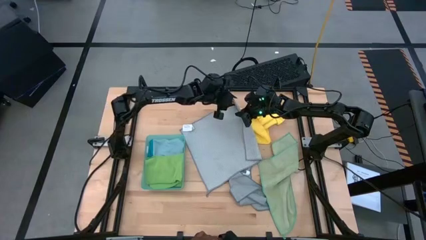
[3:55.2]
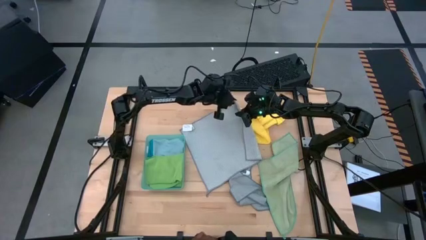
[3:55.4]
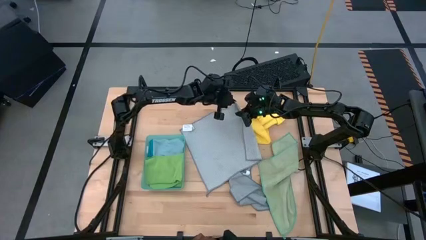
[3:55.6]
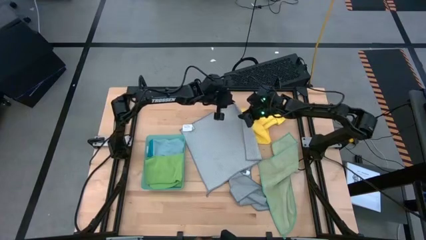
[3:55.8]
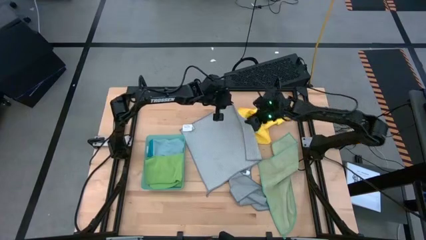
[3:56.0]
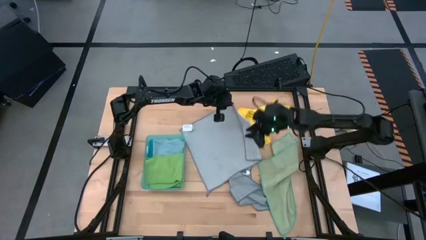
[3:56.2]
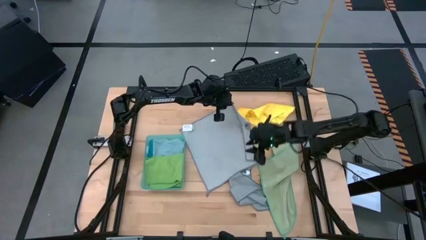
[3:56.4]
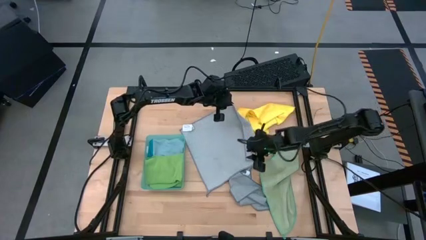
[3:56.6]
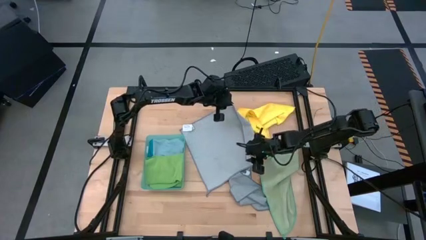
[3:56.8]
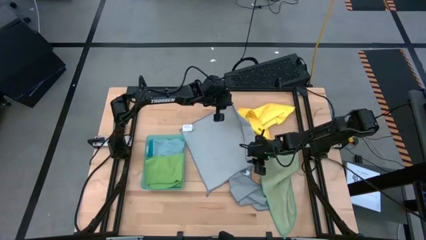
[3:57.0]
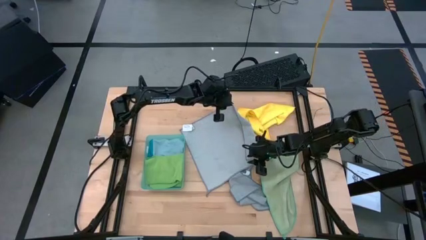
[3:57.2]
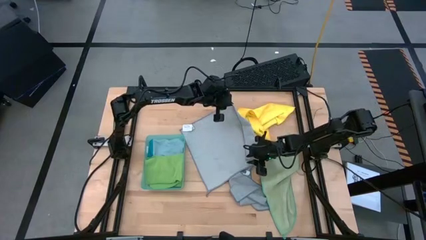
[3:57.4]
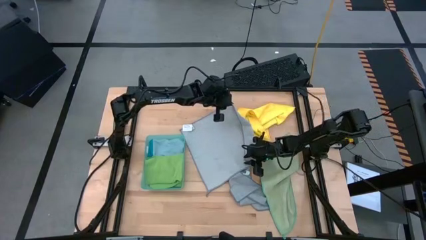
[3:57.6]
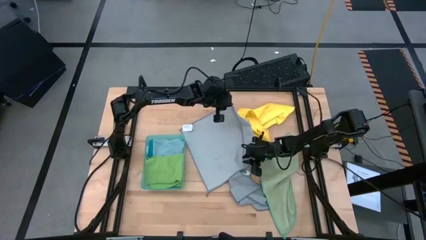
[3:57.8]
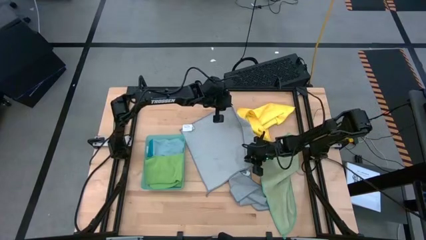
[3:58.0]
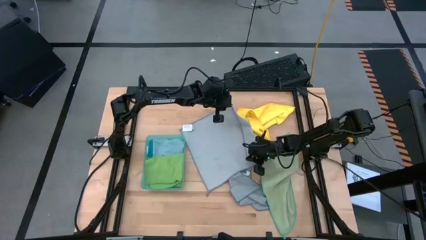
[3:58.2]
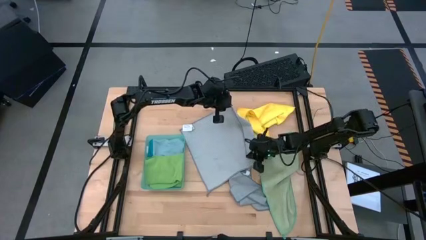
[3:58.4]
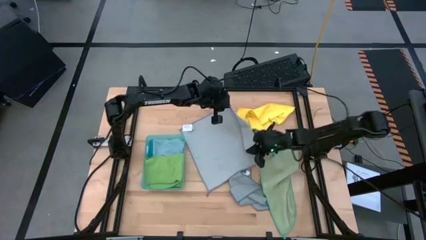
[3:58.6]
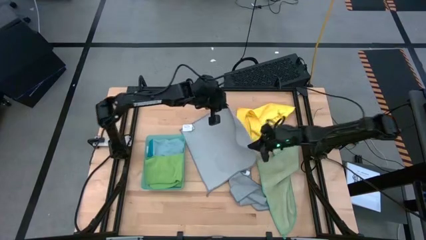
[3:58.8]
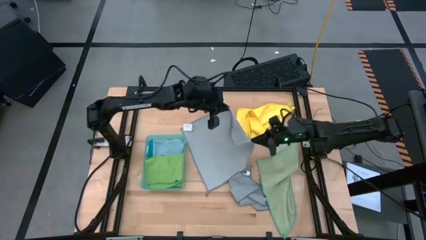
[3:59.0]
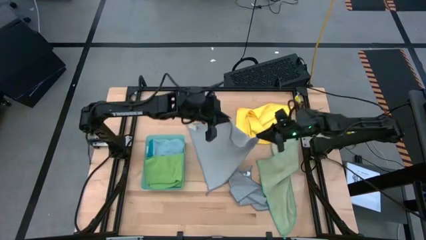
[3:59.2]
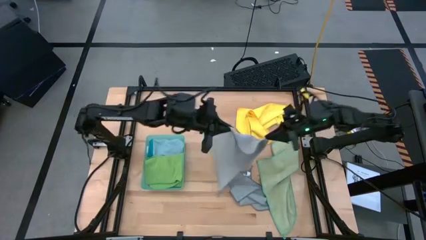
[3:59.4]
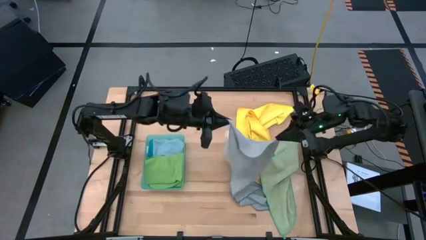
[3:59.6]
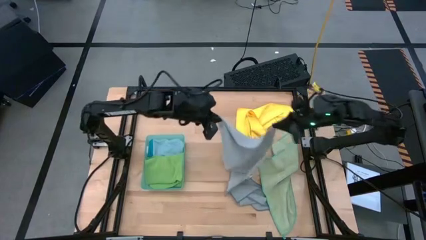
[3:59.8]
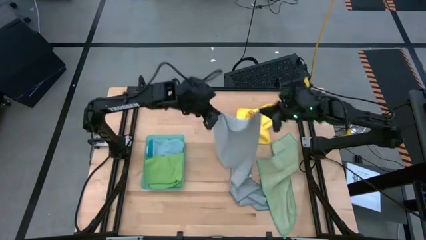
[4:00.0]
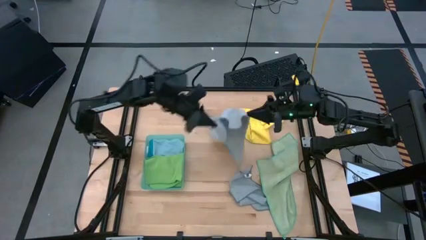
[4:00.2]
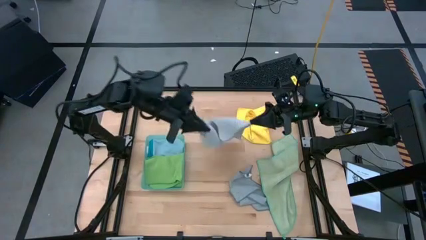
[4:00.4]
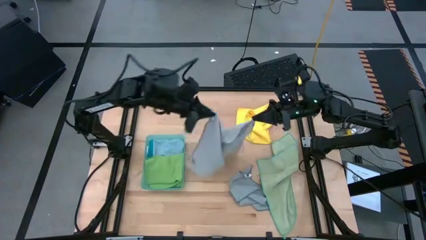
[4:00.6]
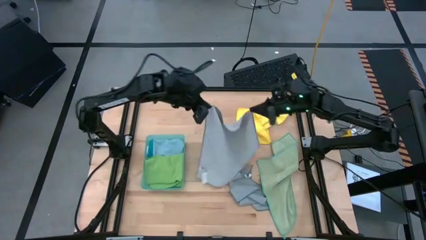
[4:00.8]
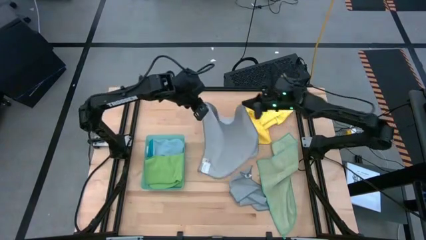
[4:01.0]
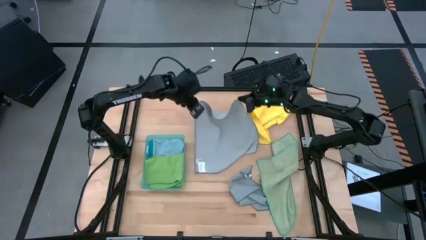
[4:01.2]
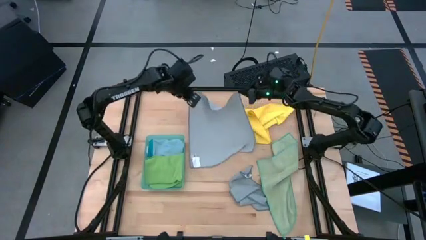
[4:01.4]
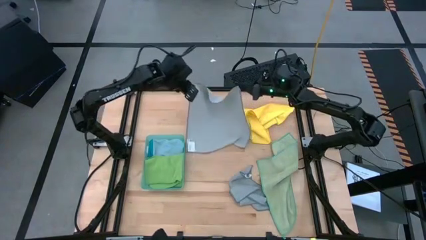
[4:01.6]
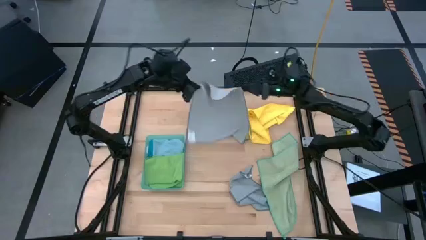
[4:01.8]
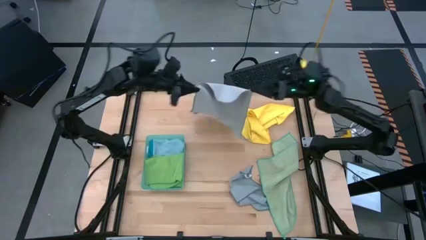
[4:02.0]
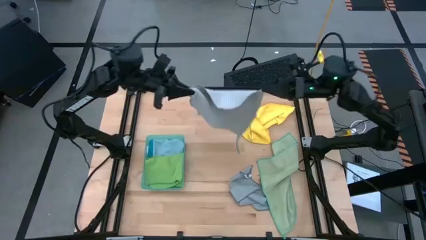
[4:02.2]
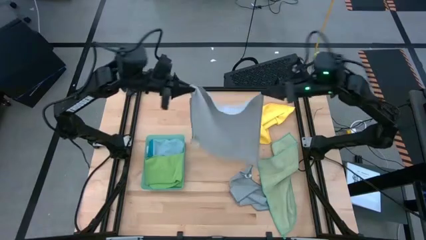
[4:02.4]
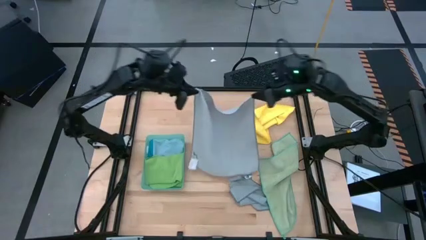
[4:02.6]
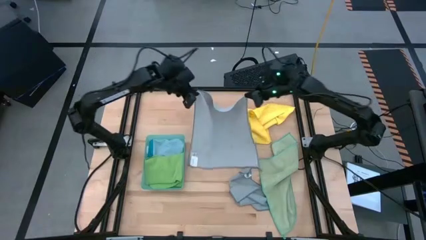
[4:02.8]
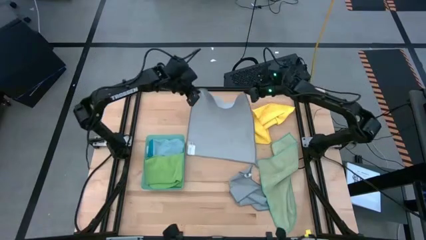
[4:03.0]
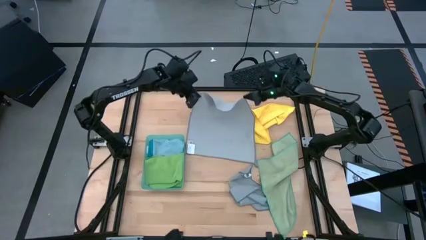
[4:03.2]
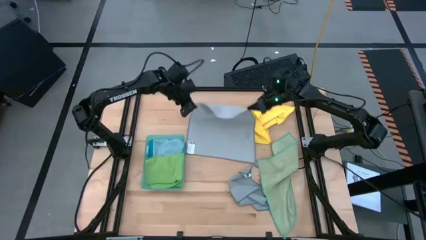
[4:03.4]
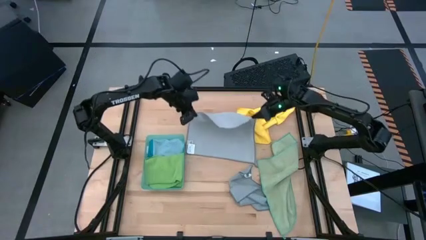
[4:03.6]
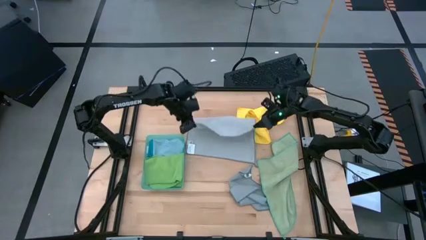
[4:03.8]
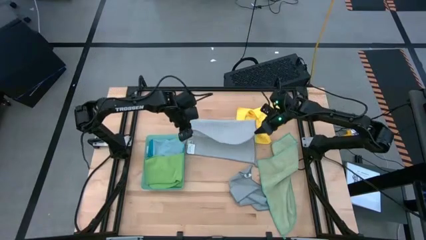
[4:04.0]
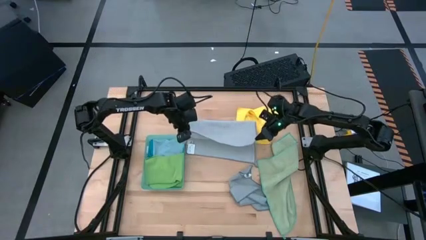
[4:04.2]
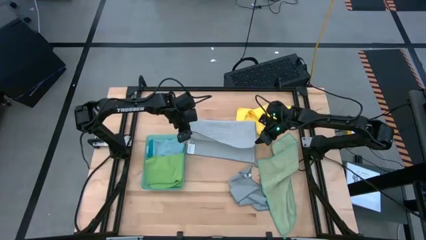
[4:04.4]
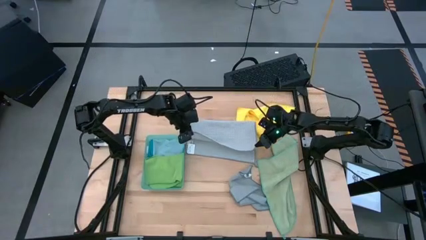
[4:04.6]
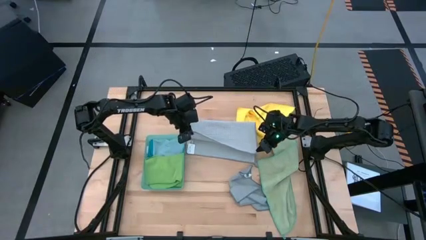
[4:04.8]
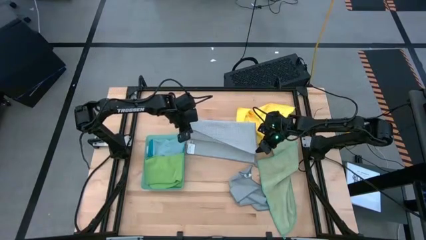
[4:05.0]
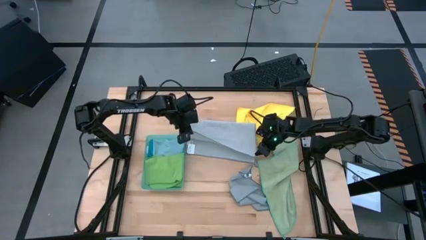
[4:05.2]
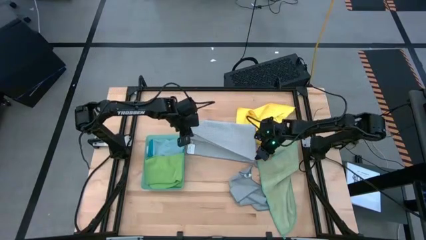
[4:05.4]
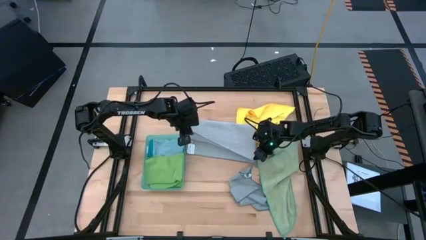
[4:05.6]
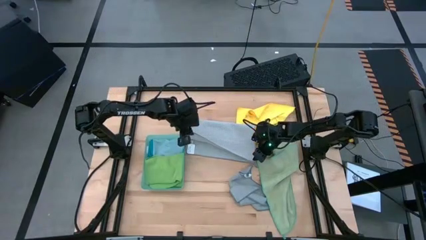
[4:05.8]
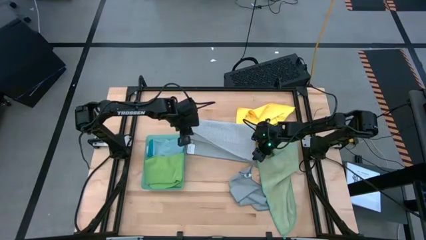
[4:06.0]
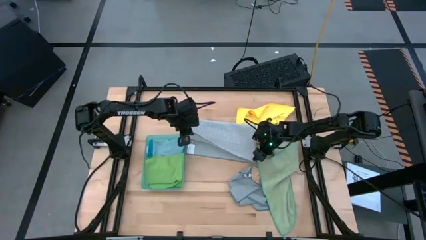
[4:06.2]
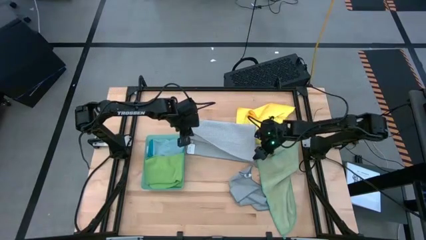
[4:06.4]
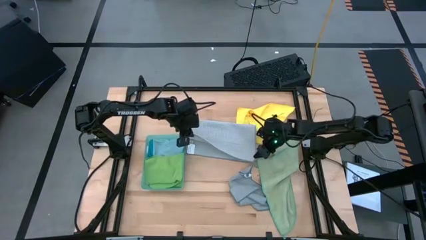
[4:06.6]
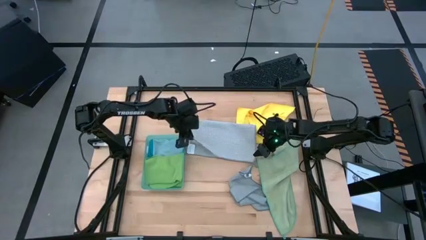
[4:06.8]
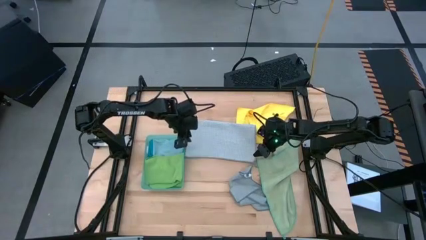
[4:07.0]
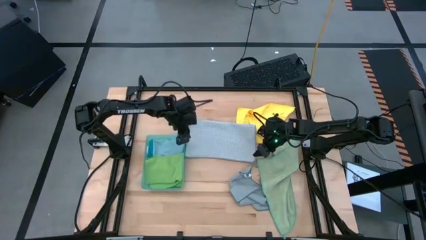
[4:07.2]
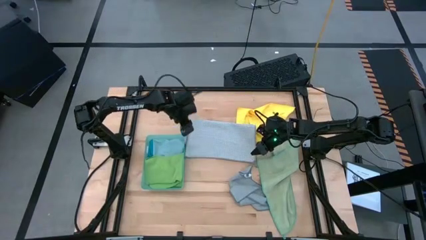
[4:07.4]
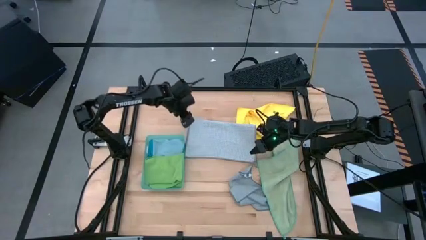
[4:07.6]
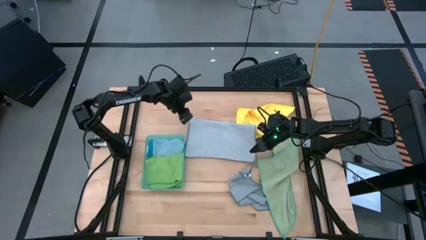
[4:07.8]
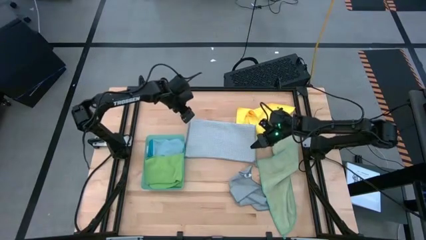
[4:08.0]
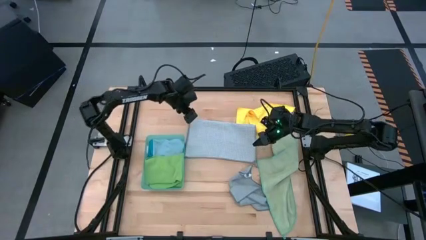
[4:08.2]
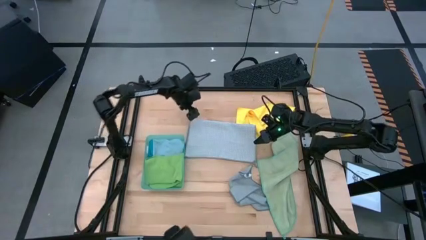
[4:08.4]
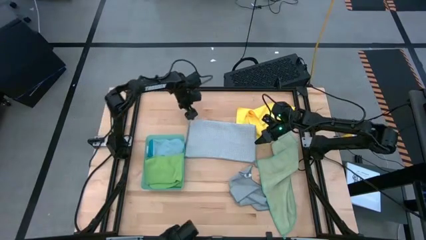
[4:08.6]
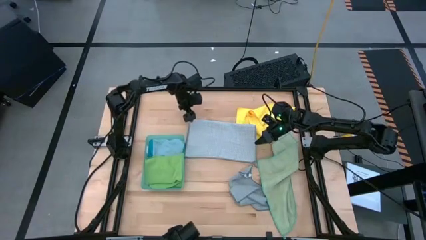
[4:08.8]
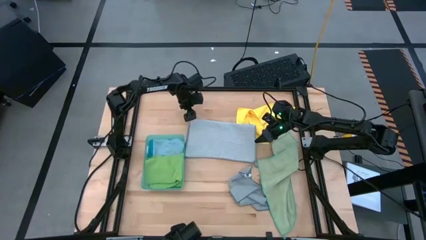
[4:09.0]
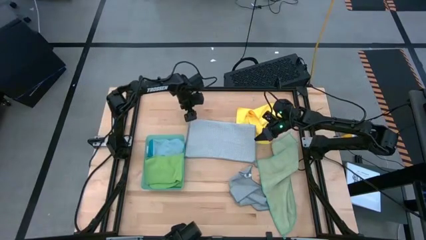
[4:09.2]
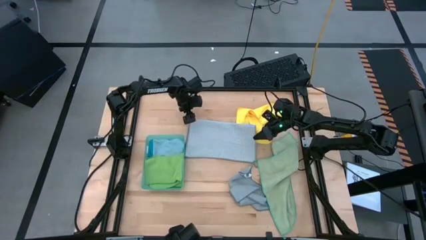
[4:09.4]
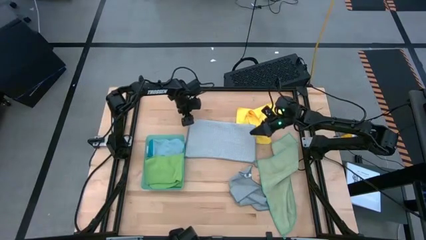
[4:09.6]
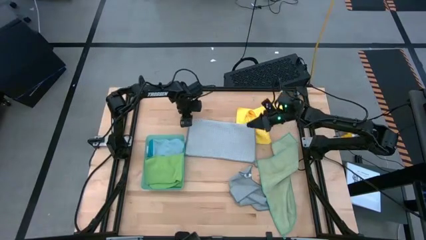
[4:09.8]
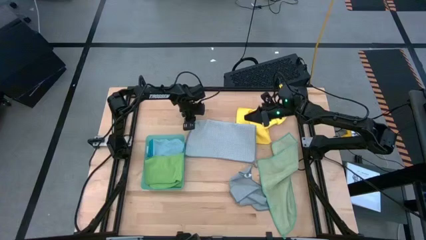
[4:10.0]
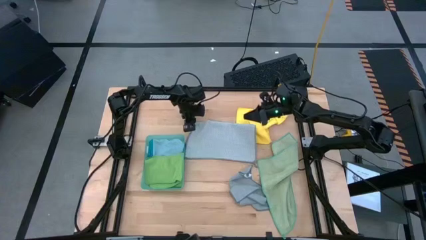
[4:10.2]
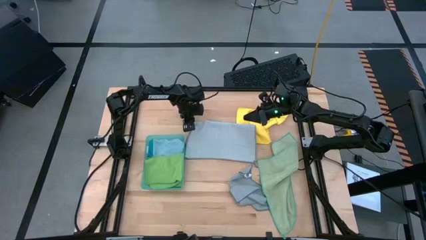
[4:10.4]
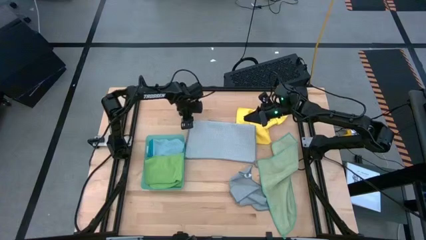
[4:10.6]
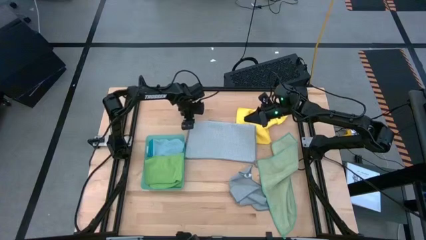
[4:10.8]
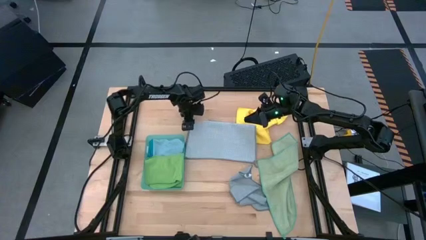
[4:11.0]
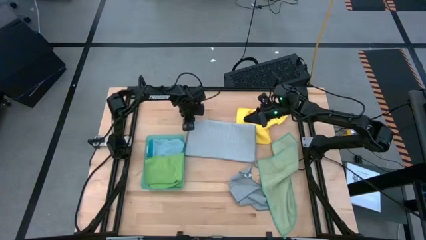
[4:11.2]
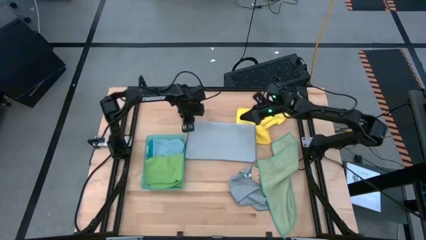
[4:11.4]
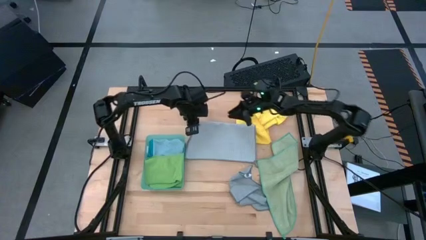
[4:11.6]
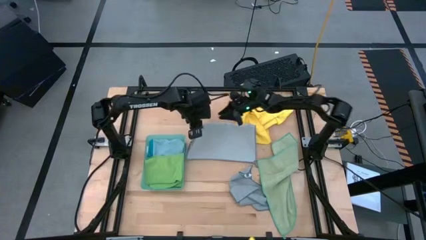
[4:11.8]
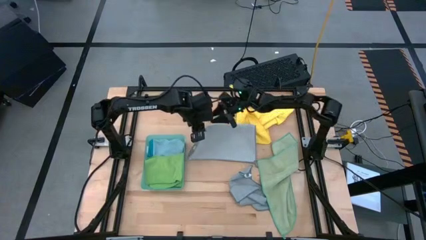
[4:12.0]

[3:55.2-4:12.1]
Task: Fold microfiber towels
Fold the top gray microfiber cloth
